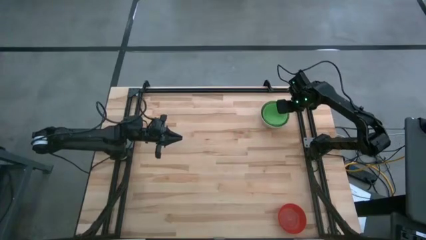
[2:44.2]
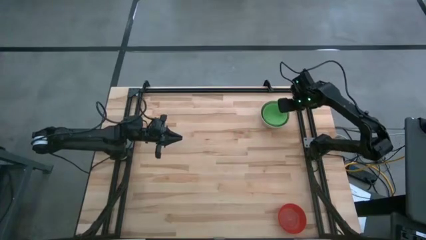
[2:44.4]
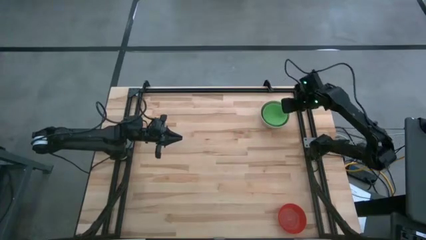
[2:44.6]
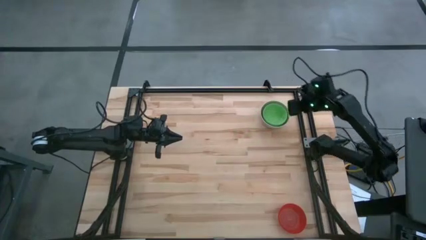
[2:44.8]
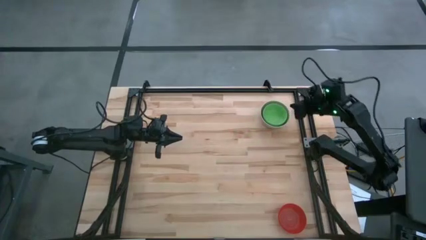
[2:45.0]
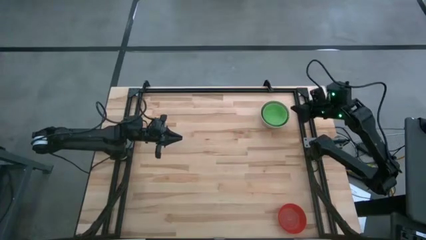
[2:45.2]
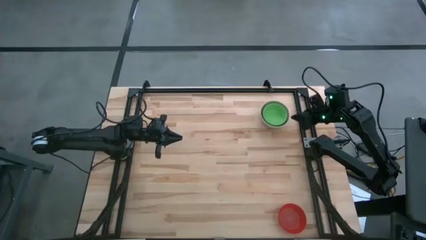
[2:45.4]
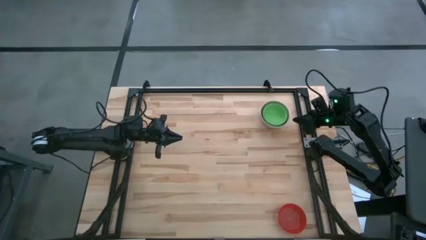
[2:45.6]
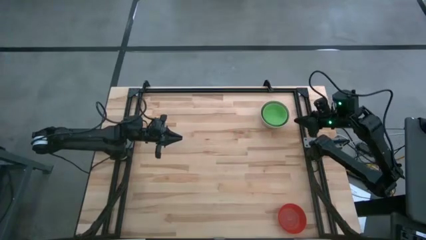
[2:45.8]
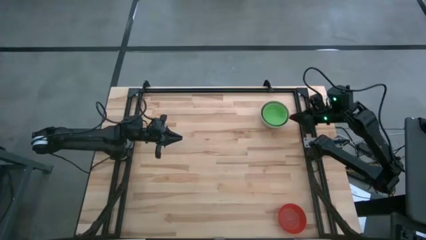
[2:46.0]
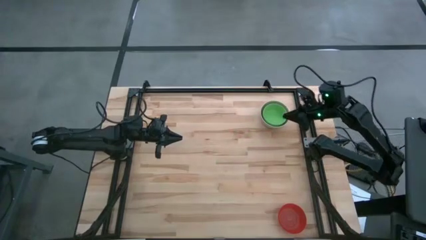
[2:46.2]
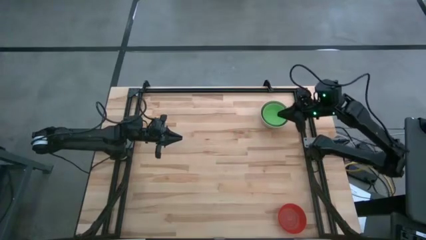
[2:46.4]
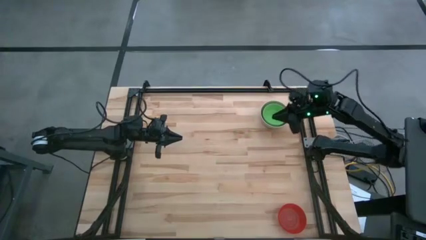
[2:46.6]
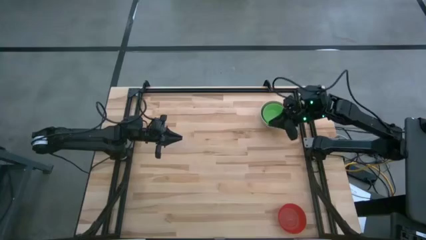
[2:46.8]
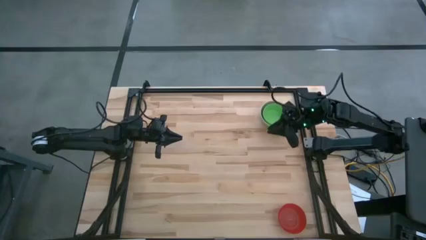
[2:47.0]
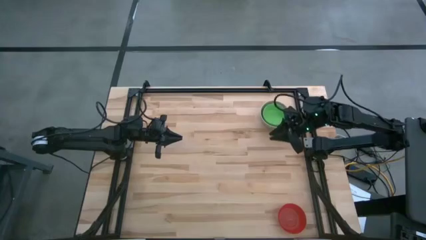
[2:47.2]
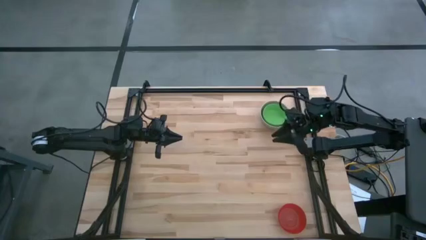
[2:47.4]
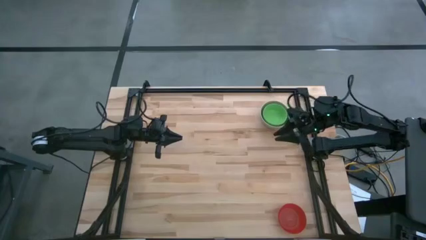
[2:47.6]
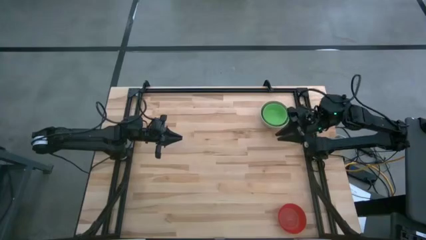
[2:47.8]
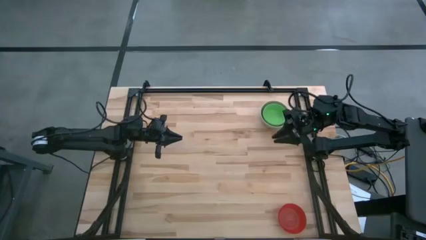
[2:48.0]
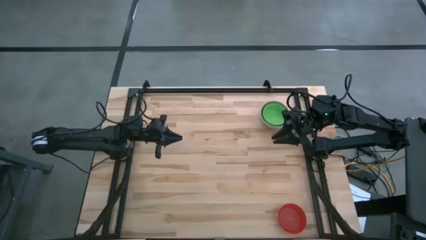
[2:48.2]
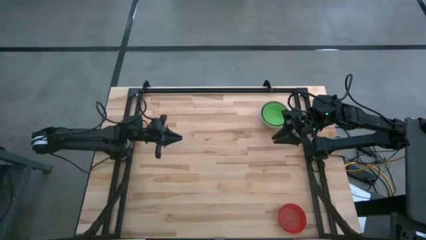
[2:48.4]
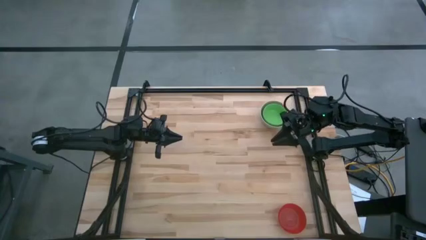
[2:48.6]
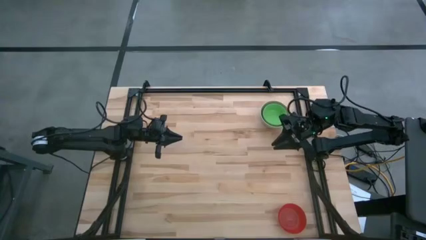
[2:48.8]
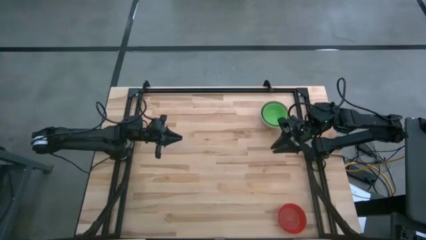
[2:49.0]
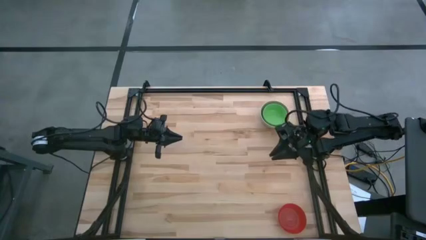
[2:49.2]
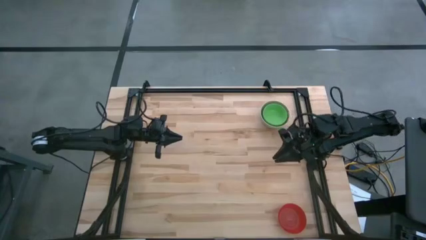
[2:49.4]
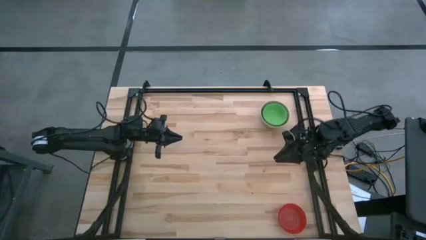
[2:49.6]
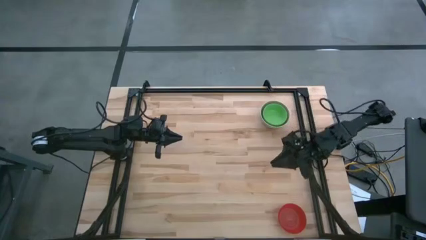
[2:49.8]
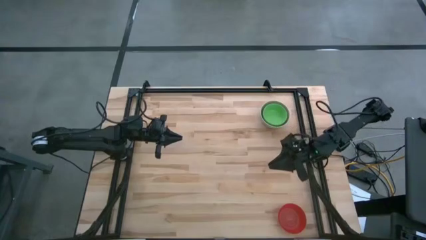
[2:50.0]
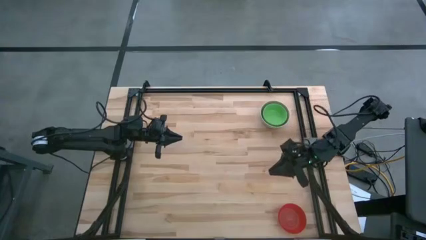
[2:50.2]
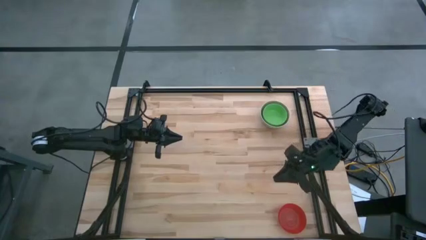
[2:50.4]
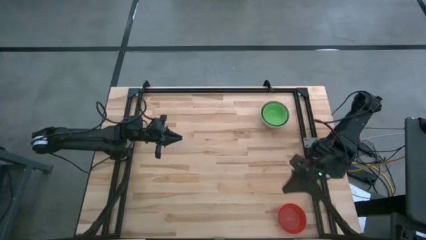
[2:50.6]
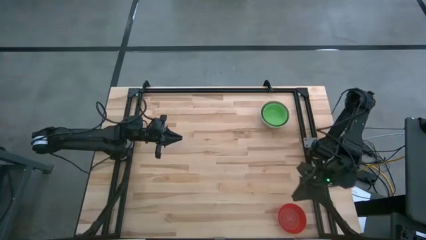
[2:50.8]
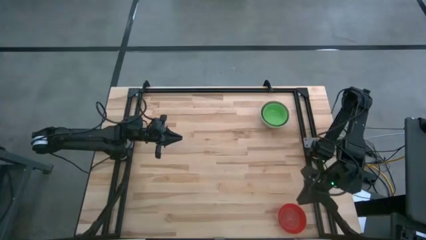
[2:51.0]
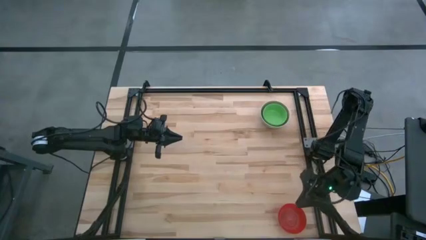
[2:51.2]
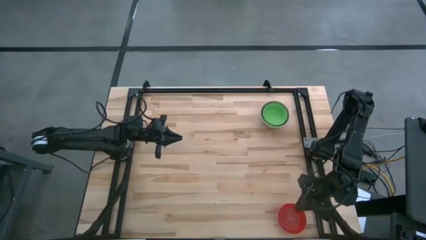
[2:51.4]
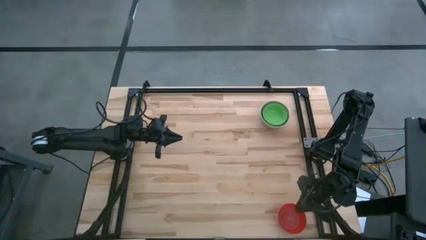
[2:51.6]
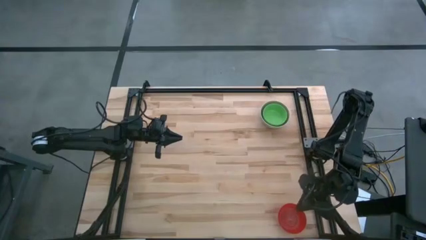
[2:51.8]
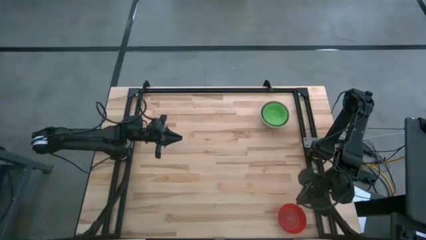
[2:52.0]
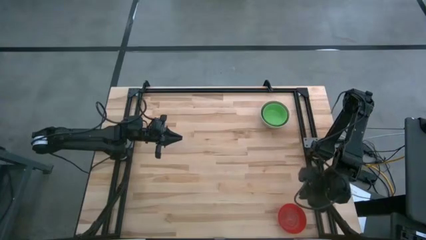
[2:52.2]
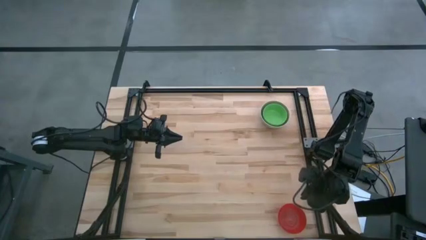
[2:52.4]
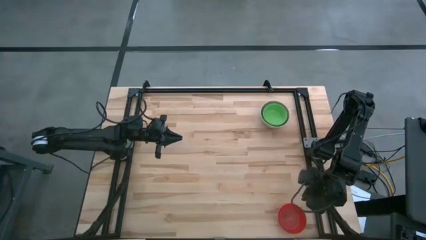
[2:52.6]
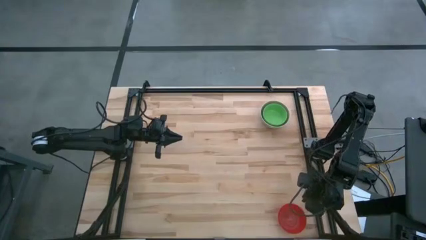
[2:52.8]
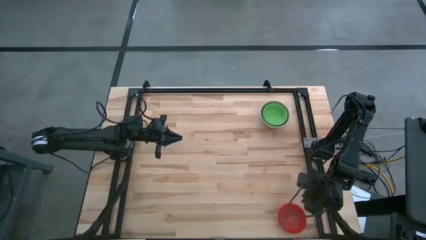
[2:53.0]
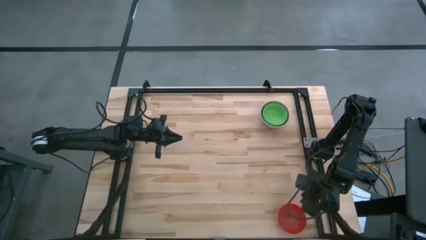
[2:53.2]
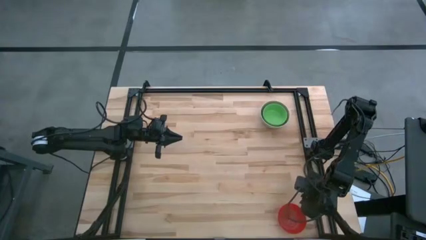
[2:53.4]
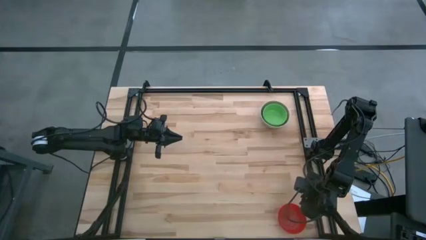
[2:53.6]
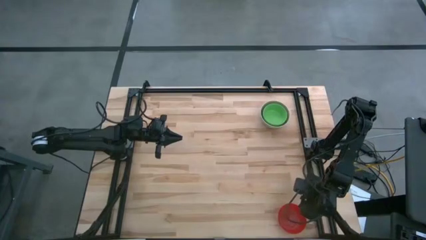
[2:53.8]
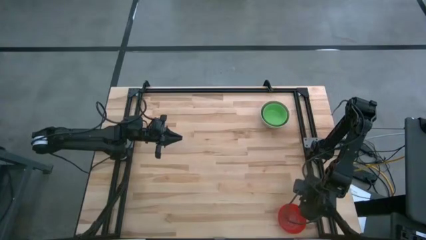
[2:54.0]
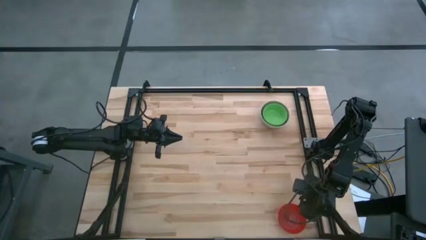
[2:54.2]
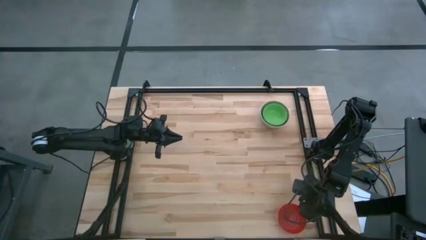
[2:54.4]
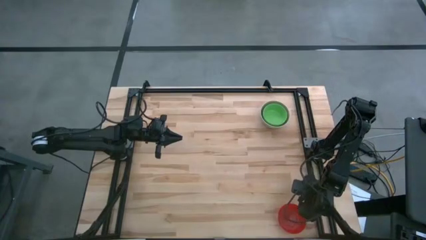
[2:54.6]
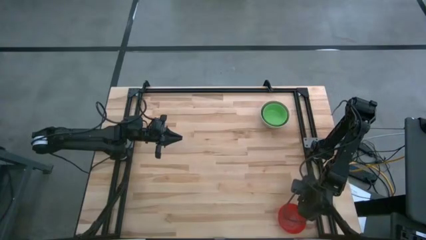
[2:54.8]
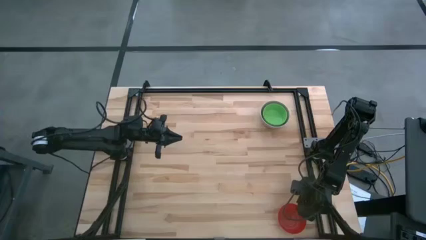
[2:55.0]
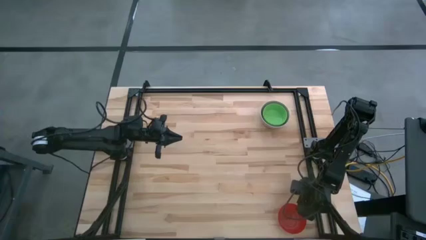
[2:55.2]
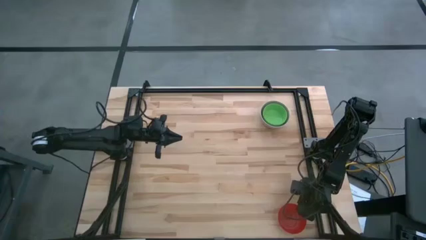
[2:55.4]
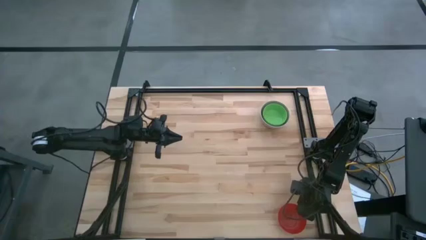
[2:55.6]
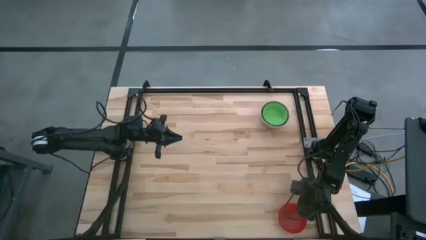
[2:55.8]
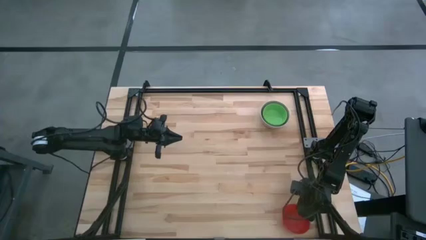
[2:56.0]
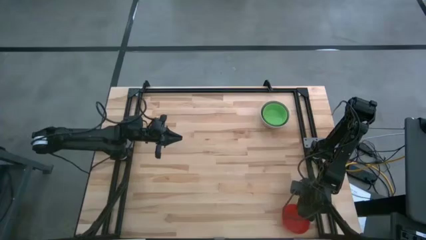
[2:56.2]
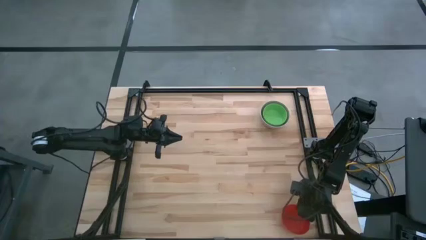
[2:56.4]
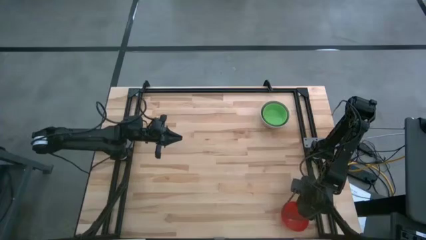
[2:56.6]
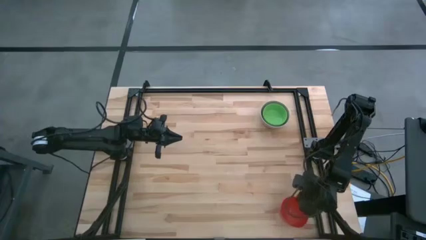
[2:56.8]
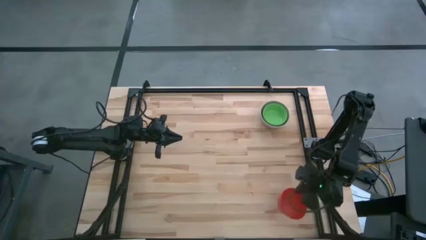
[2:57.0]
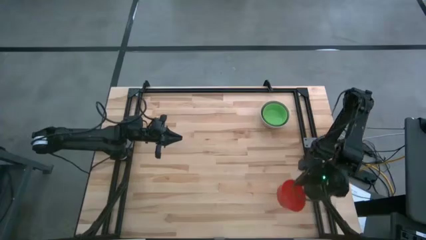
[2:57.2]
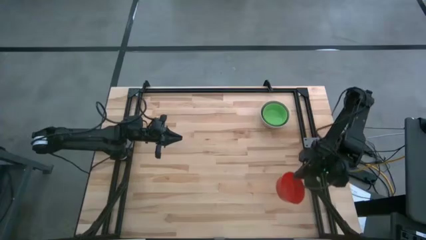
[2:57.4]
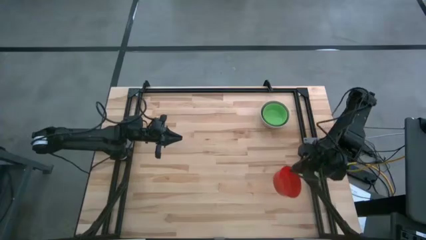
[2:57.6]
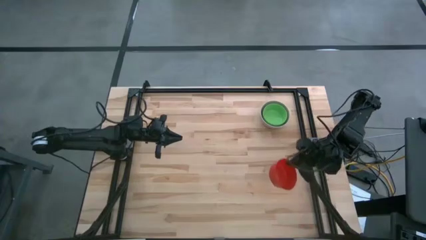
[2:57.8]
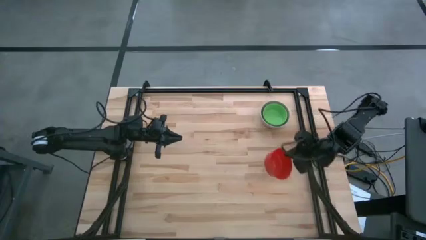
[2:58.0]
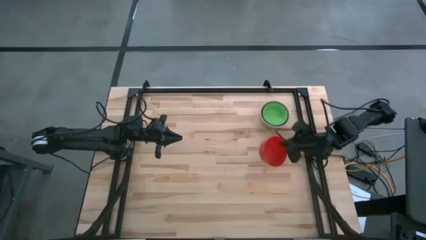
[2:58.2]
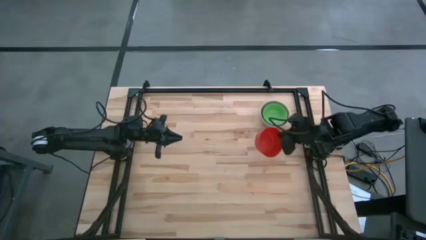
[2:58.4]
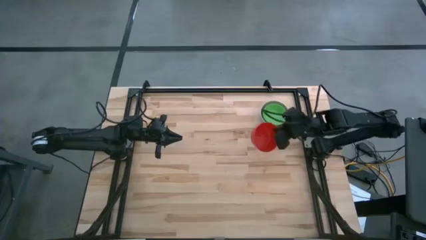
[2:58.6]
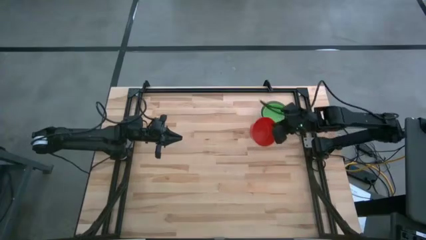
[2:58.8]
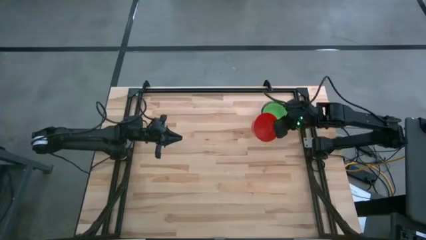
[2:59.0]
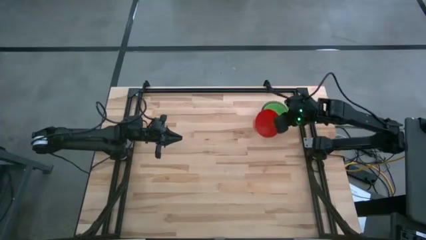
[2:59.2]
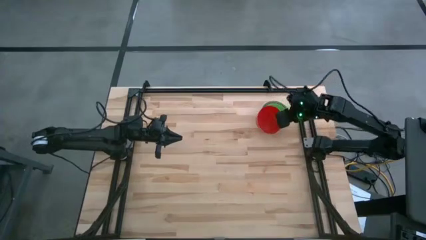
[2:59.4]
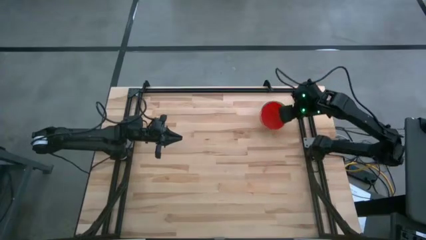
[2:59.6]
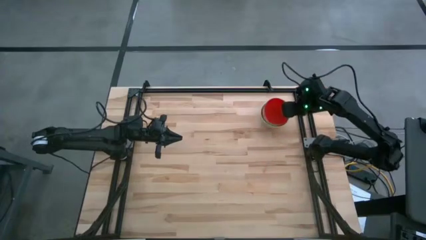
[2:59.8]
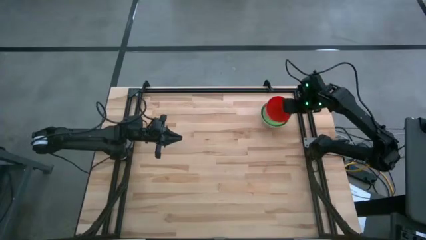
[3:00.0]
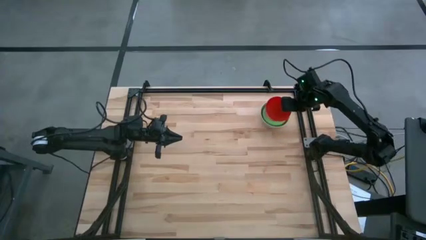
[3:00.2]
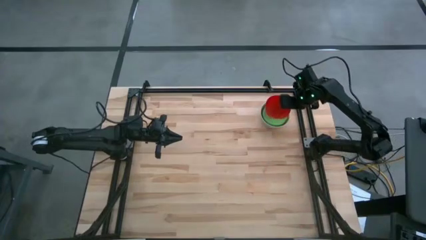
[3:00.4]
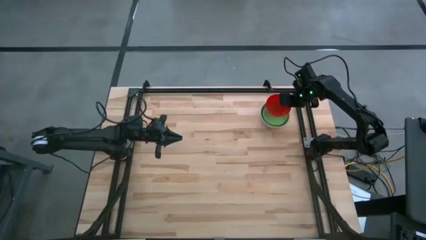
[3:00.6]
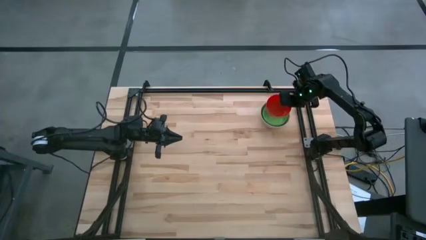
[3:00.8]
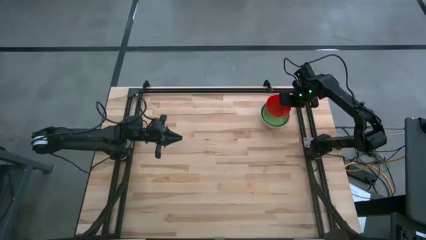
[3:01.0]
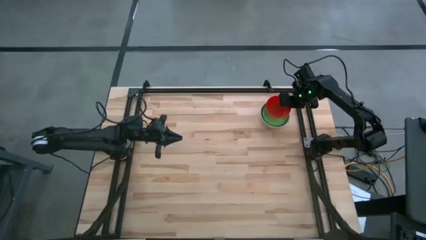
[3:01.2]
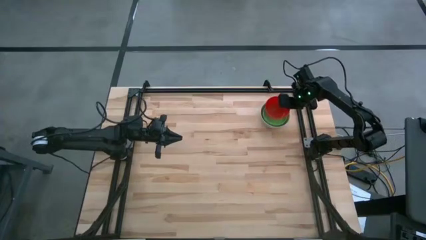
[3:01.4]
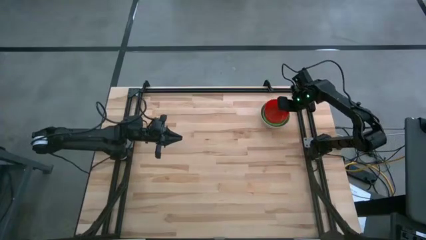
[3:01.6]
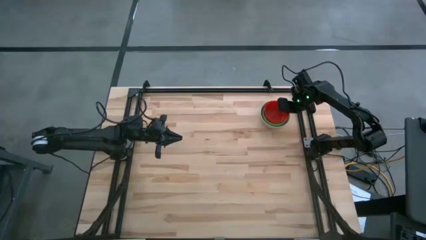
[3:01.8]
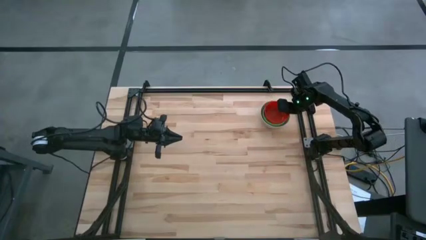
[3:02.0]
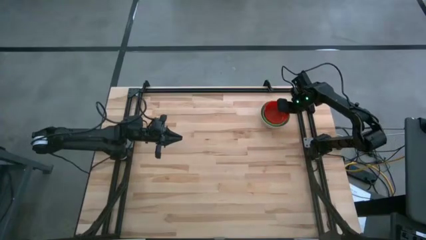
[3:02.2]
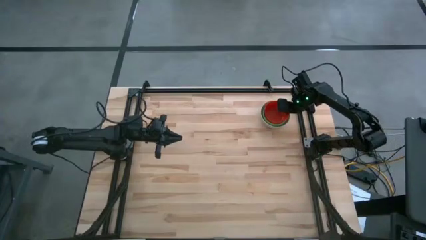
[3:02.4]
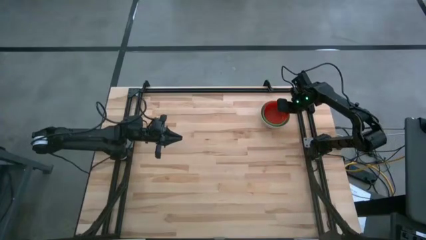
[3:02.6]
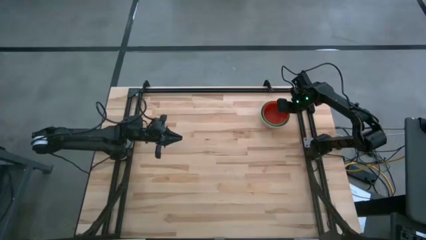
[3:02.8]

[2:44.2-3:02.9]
Stack the red bowl on top of the green bowl
